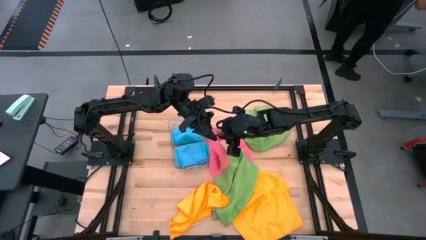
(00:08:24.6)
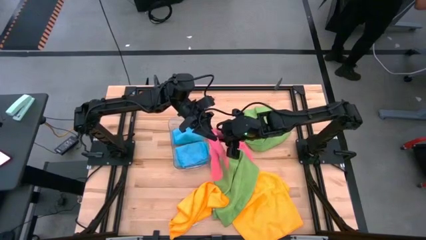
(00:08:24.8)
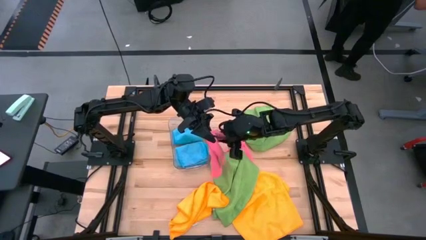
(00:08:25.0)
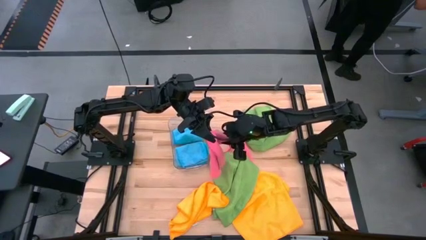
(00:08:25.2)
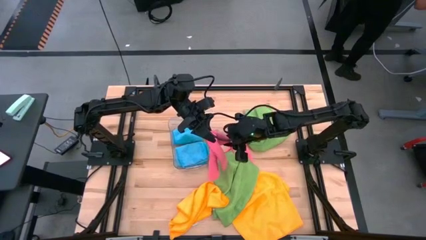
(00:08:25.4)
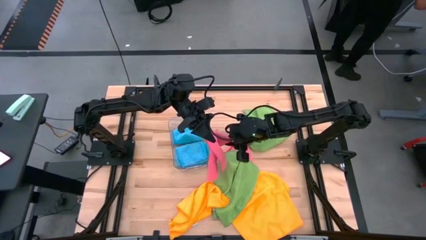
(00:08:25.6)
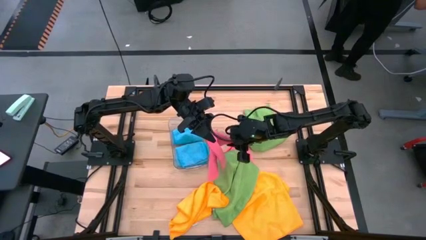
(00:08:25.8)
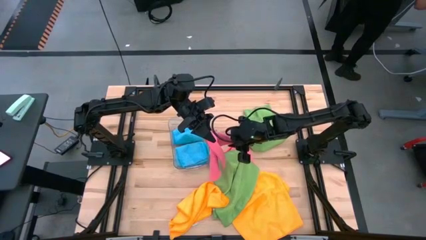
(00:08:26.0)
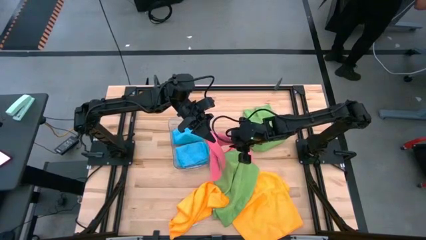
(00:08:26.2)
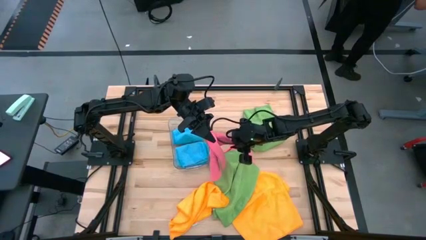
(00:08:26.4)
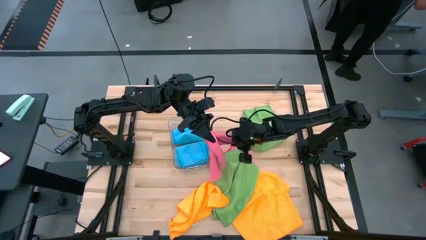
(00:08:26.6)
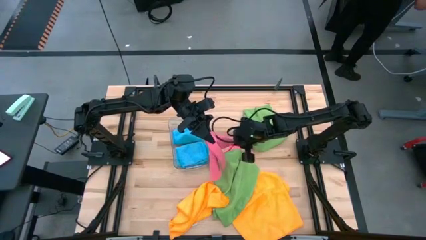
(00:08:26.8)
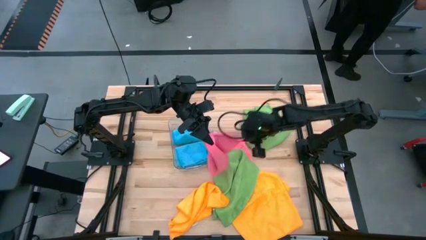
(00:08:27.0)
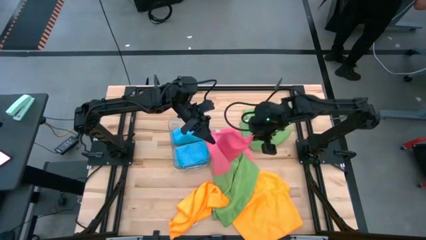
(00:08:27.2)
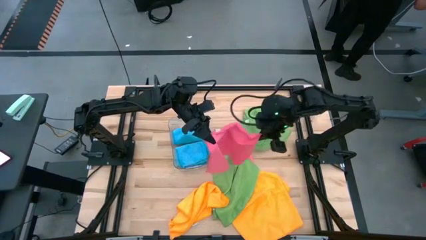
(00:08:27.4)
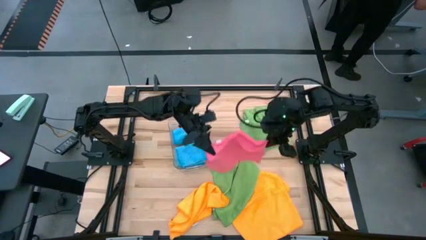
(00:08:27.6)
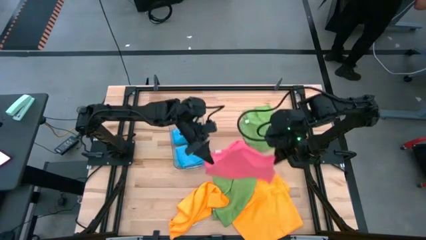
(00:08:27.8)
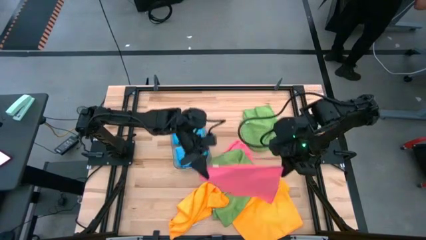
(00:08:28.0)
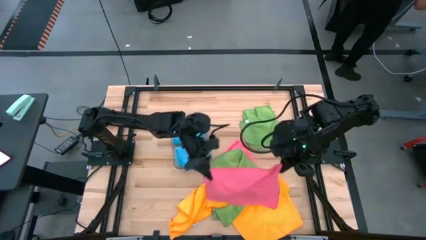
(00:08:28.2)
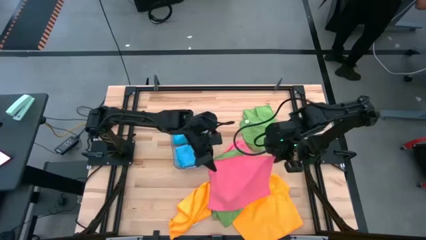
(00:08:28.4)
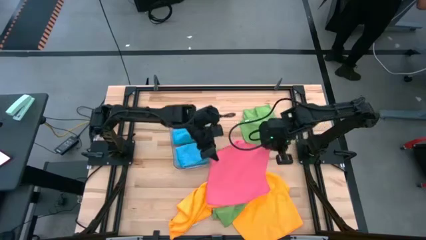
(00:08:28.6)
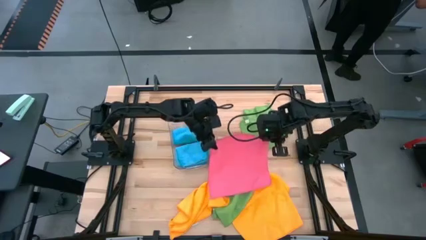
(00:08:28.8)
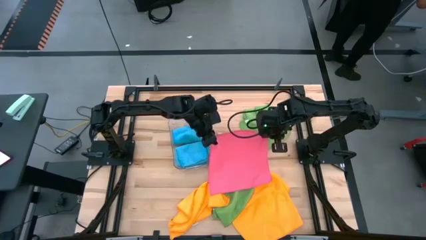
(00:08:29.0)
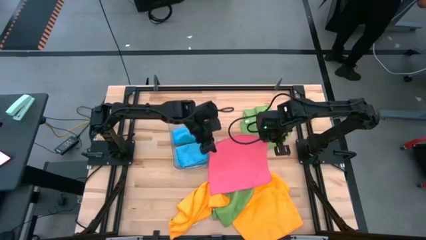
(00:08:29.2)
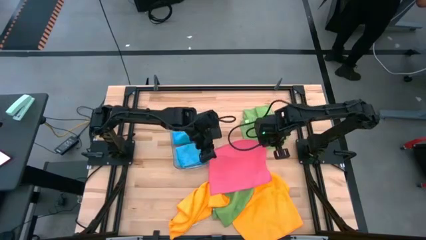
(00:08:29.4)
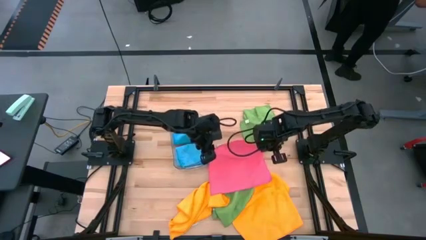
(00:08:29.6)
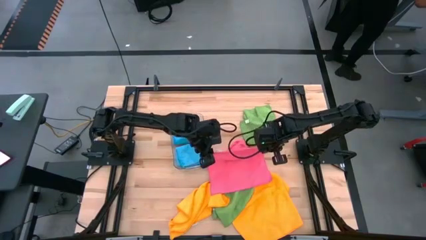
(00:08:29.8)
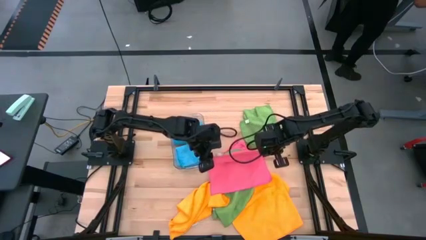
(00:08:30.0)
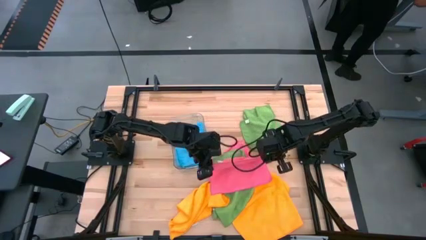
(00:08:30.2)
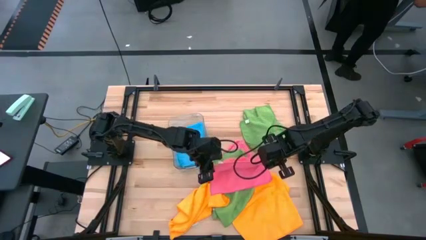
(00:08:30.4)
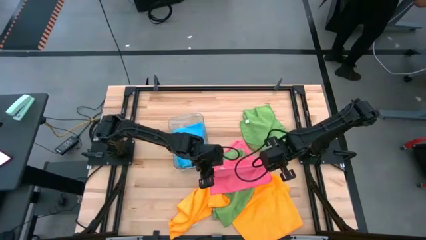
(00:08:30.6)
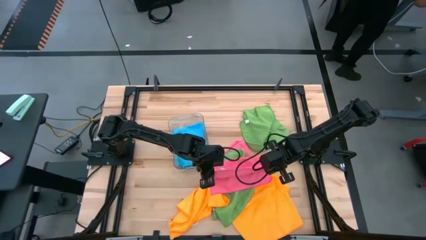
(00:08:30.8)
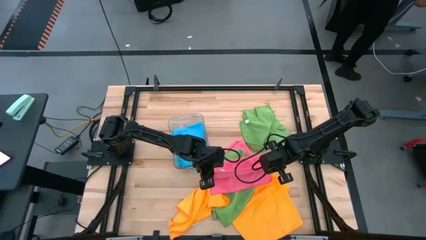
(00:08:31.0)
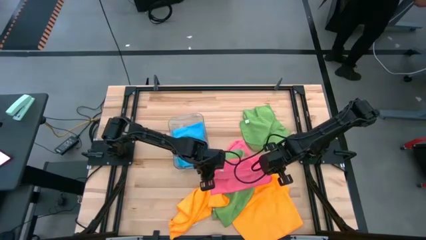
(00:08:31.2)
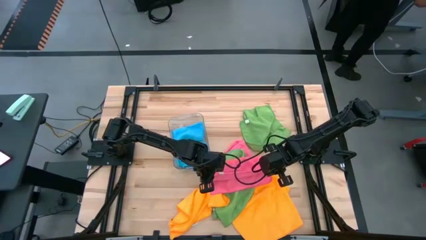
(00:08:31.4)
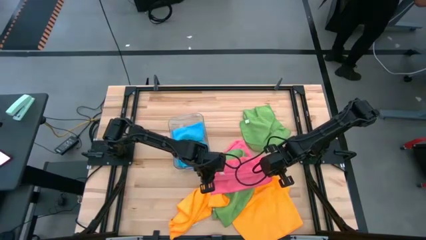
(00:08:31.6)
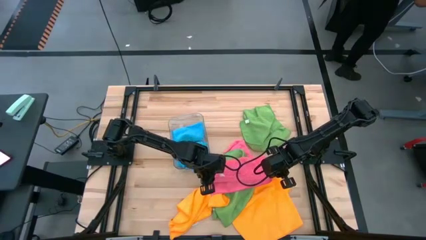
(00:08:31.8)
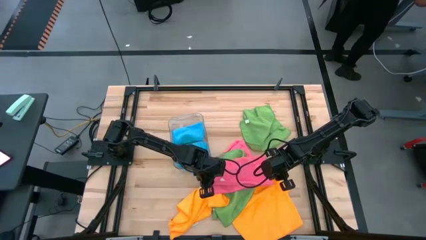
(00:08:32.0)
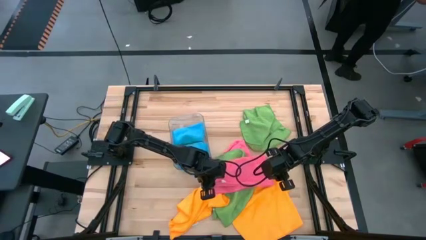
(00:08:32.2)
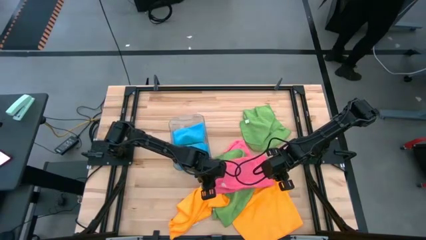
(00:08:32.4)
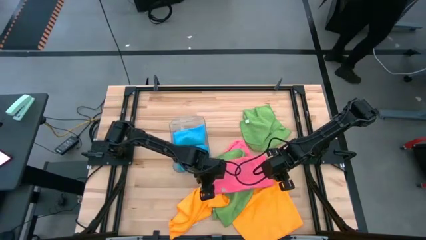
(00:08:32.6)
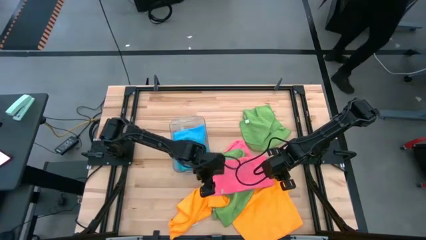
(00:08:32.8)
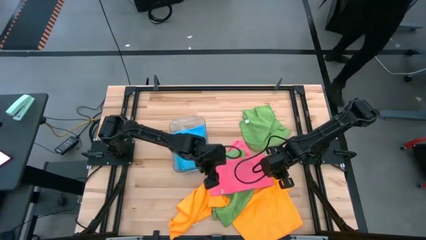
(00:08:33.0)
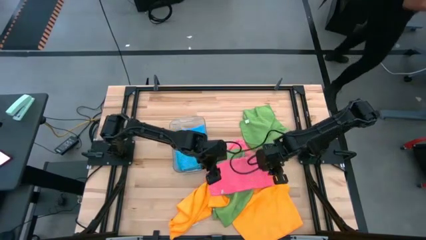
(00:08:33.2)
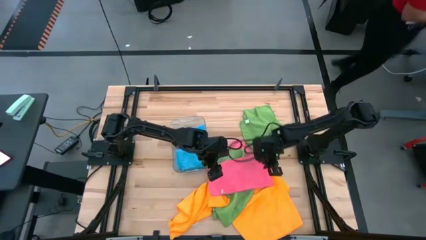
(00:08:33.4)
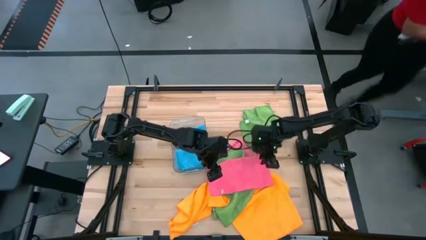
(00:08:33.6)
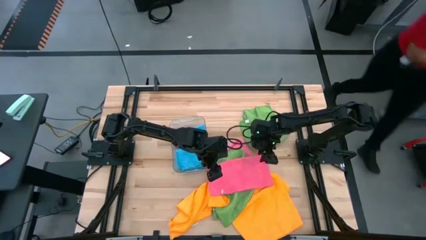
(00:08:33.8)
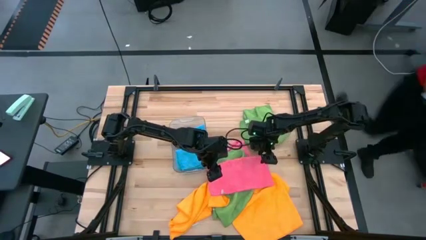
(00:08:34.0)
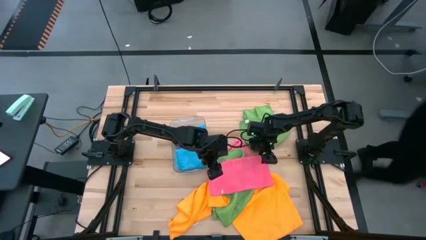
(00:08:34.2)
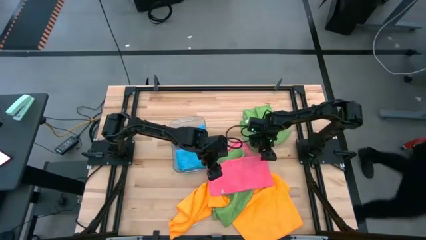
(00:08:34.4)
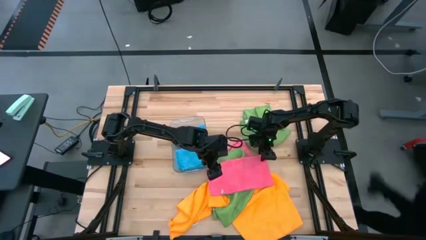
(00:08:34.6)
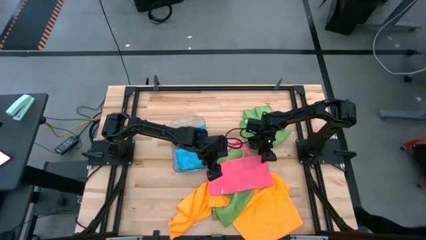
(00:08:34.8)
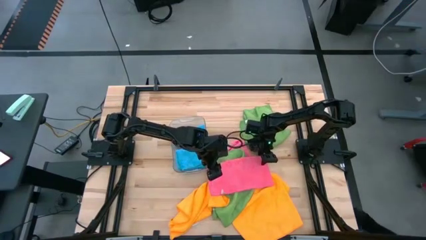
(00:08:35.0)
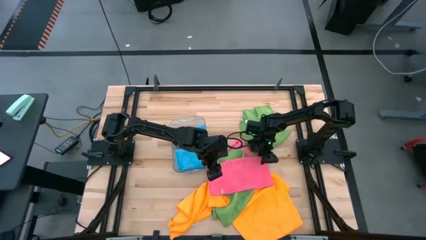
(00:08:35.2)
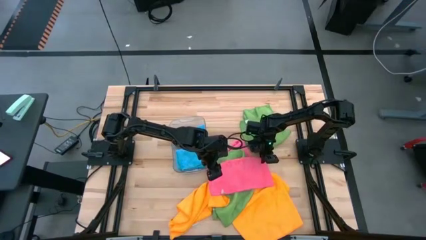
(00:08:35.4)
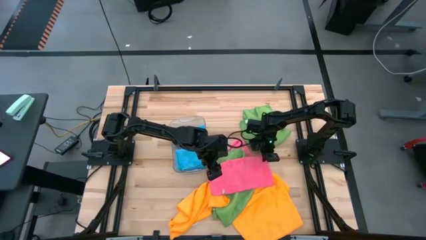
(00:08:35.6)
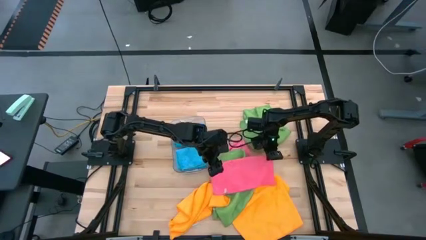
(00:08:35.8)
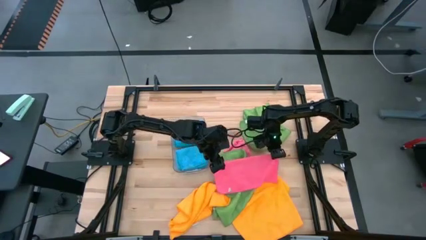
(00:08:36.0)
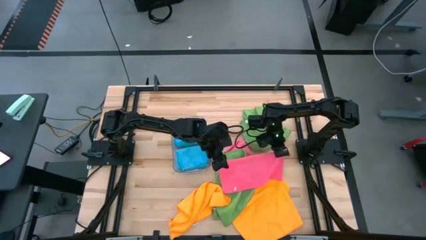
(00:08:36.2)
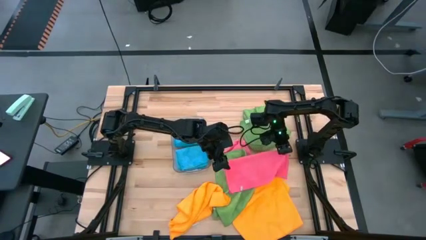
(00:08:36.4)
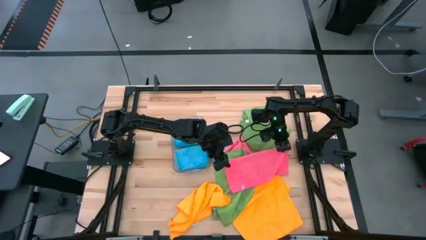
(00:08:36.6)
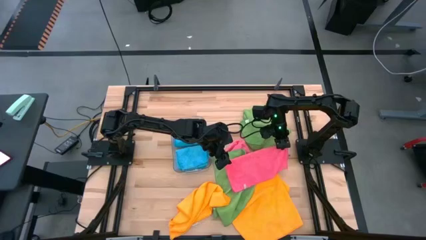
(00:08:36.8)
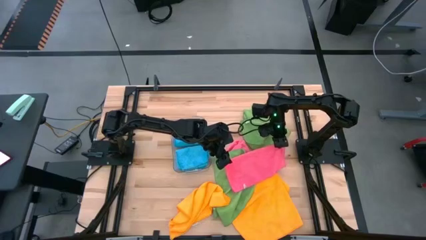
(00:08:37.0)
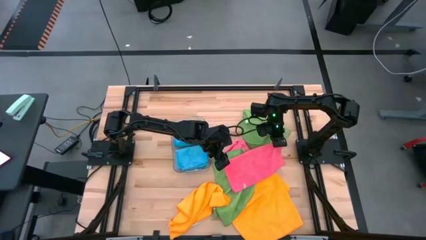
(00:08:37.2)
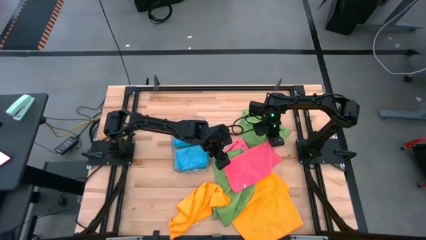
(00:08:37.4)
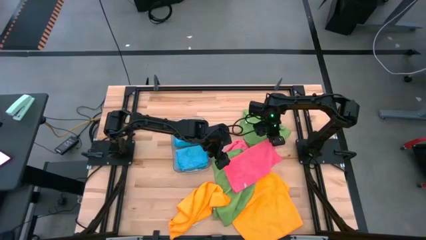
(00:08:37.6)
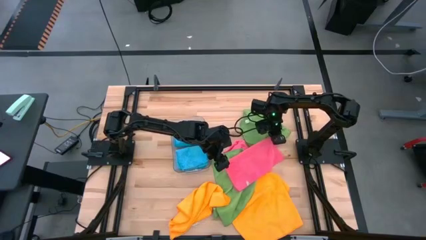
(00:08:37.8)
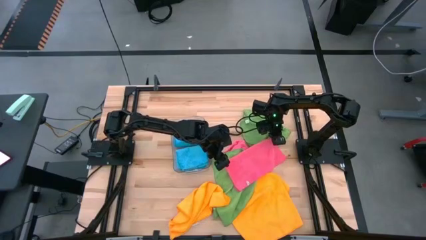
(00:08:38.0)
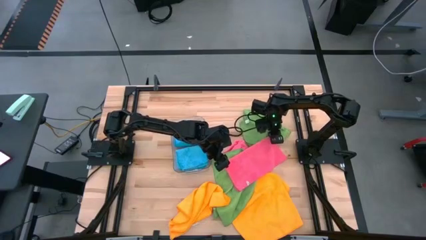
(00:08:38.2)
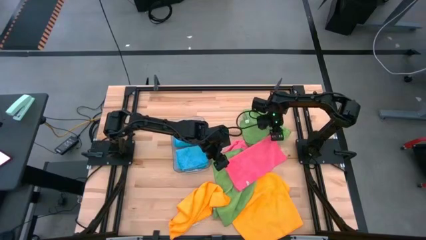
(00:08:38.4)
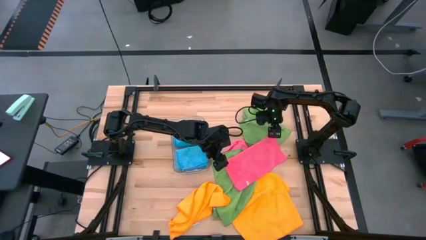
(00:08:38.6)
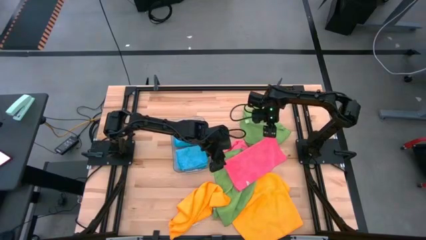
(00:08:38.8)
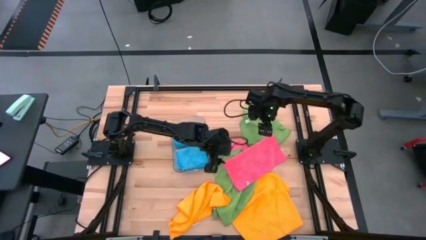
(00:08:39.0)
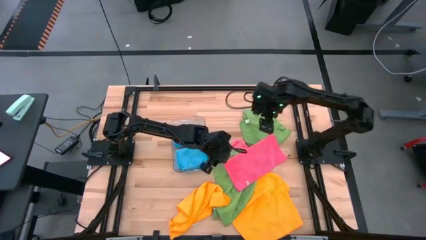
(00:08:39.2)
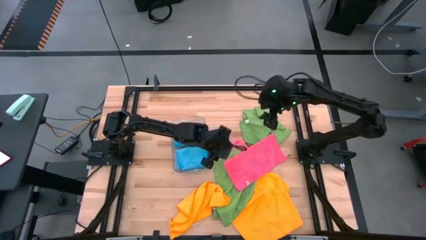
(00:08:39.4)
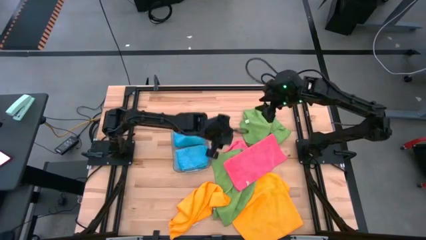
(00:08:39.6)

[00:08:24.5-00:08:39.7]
Task: Fold microfiber towels
Fold the top pink towel
